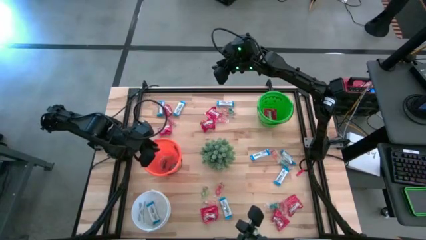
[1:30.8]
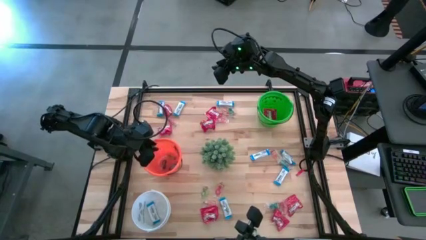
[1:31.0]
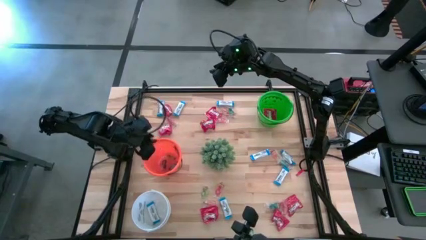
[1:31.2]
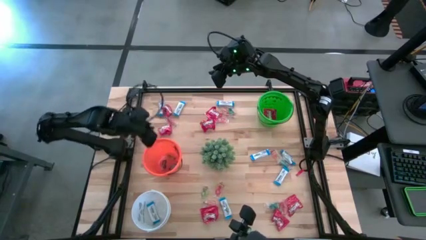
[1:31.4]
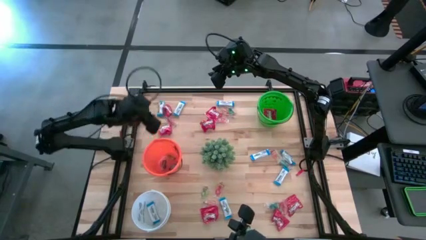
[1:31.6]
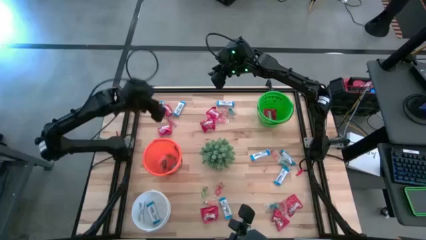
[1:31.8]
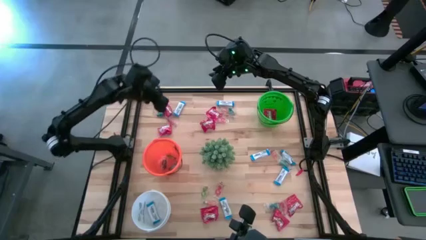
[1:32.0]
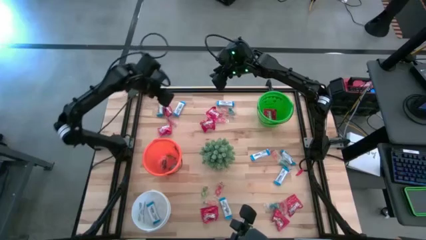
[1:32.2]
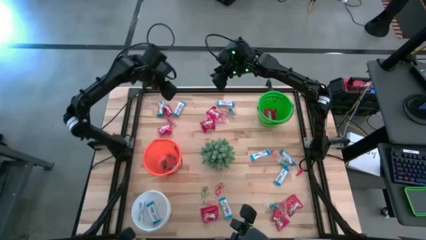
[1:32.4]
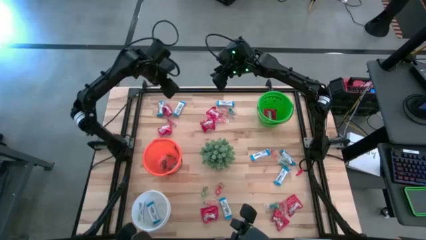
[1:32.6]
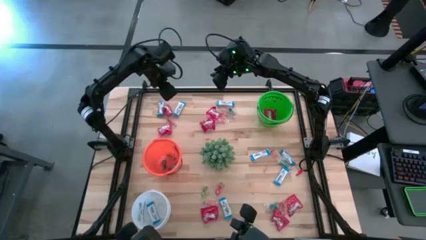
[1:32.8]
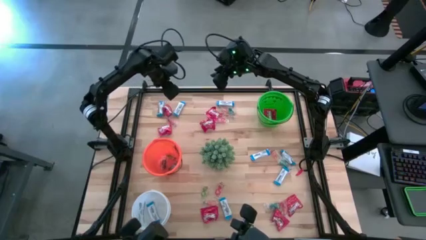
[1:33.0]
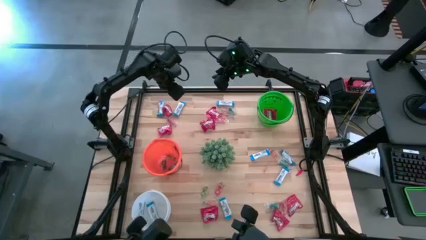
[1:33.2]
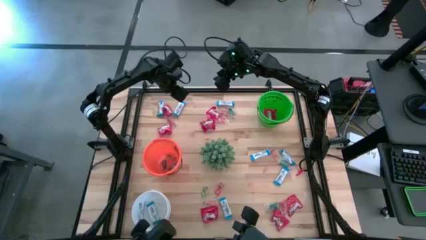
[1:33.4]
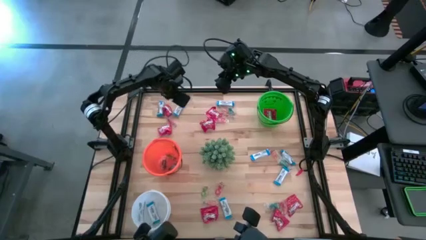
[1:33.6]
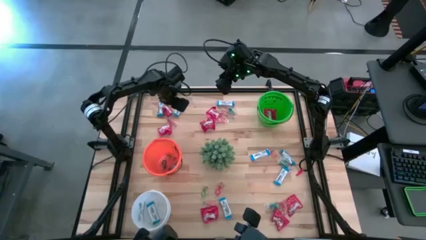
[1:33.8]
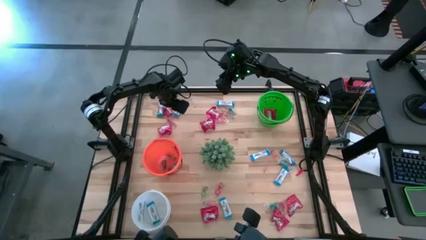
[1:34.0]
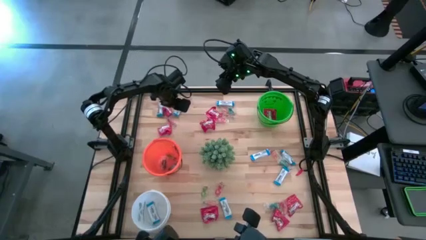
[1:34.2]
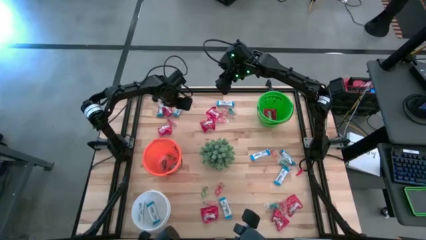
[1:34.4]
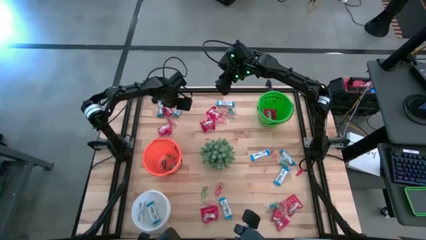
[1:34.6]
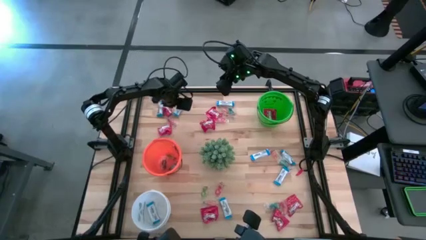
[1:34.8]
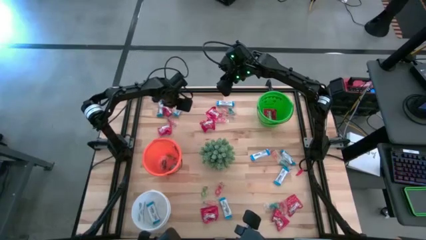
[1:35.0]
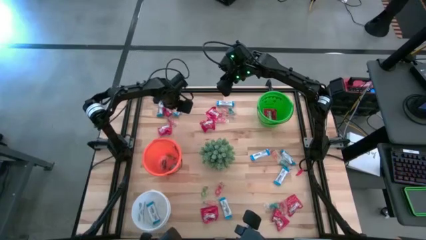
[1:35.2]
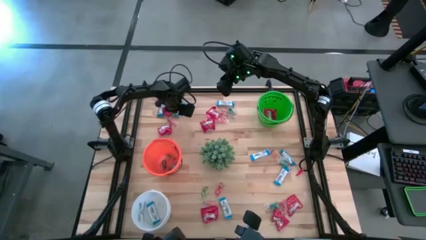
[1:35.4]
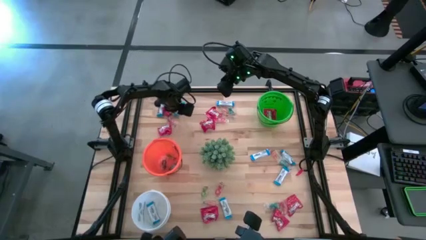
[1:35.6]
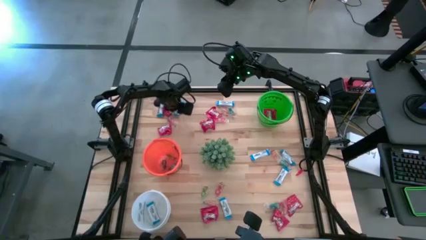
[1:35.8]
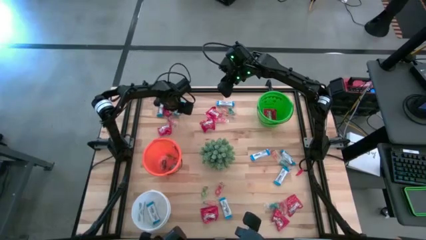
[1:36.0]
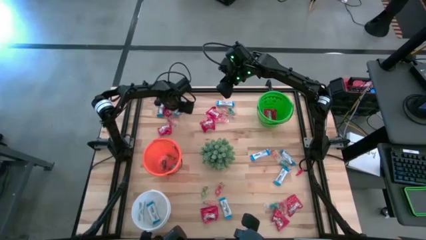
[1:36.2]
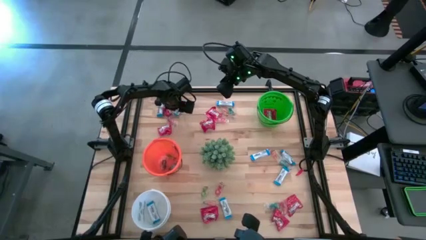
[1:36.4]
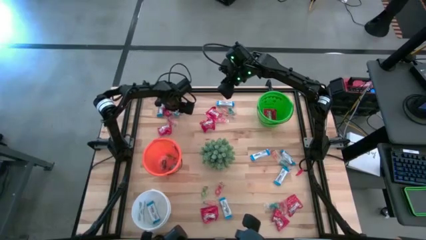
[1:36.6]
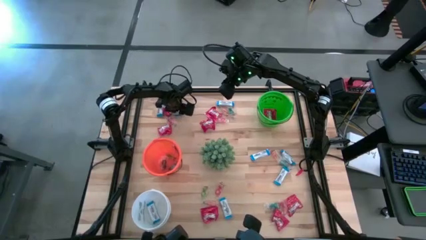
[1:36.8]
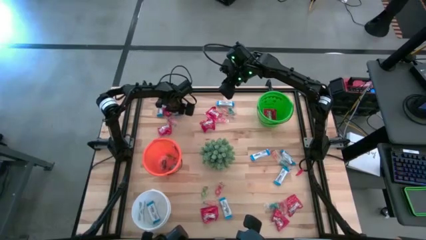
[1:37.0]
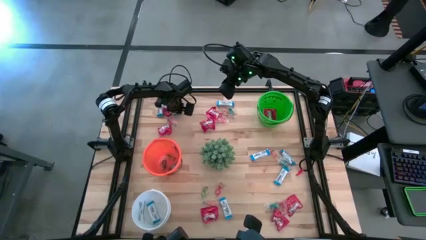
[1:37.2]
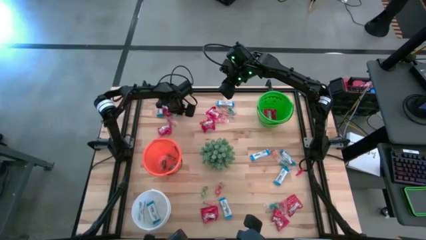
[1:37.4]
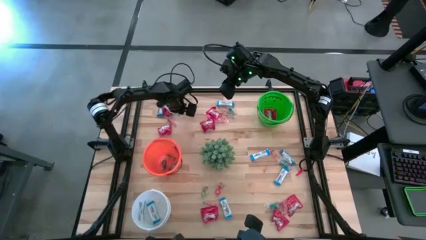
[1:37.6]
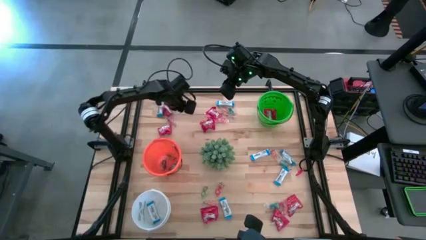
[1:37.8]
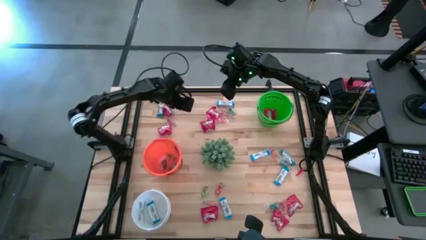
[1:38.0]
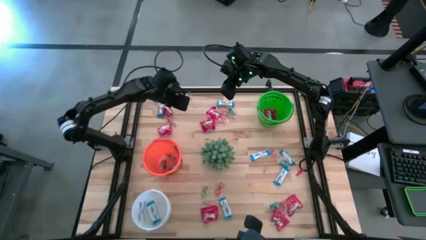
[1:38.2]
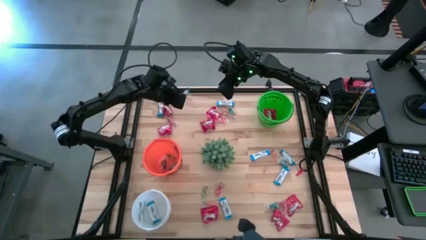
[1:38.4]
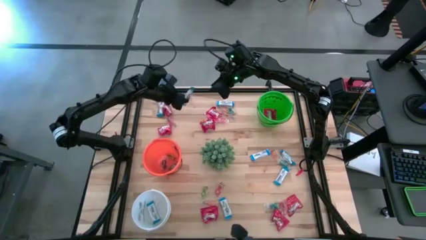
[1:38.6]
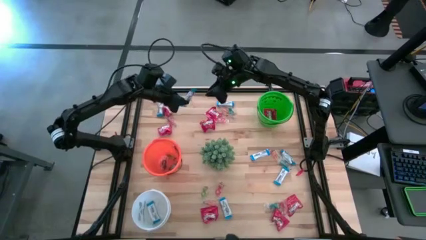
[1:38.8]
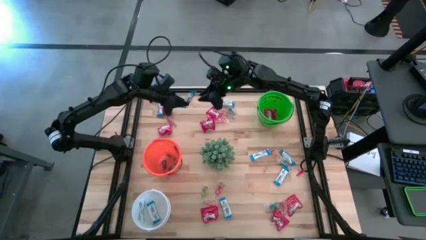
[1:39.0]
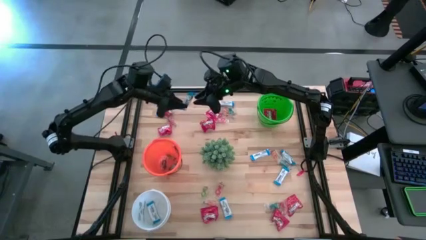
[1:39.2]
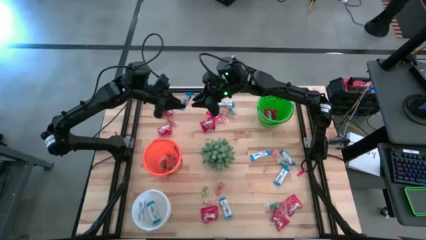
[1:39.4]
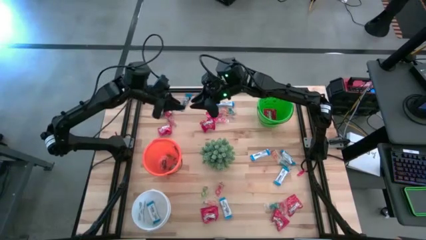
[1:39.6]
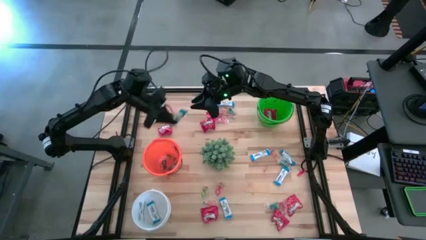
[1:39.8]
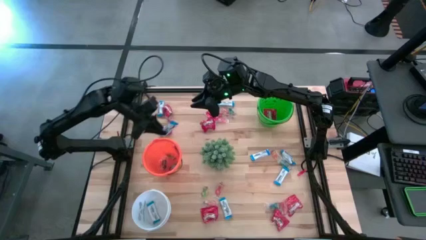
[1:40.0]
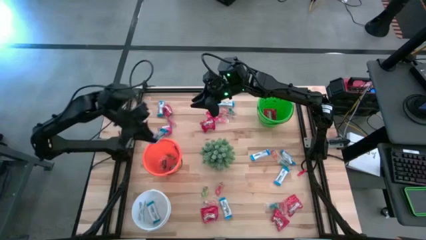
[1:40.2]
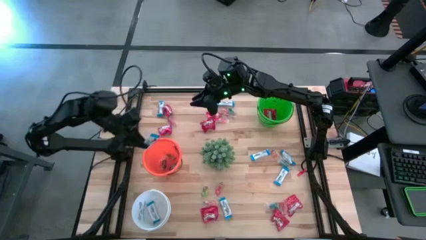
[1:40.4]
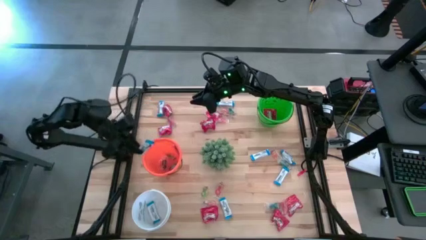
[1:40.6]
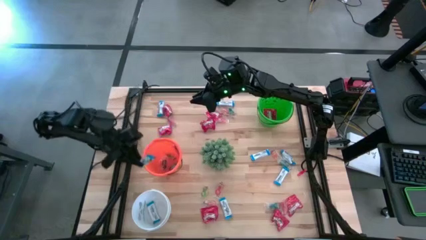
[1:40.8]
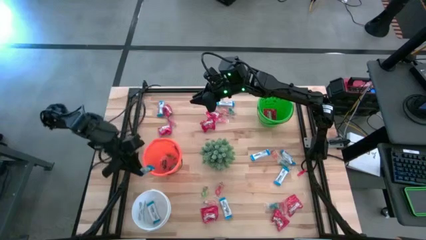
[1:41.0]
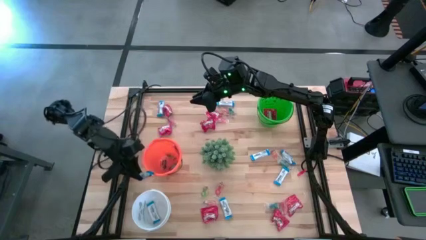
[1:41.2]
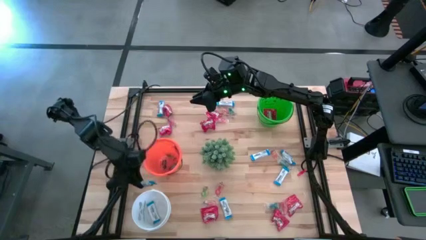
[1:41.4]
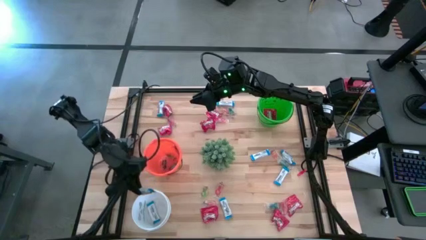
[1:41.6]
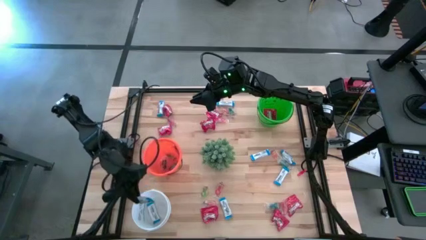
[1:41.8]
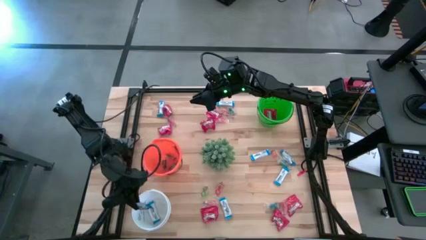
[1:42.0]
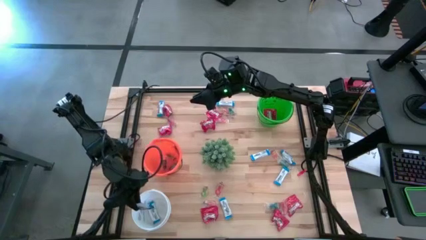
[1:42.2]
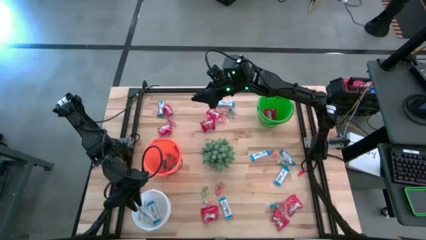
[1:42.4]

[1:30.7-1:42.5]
Task: Sort candy
Put the white chocolate into the white bucket

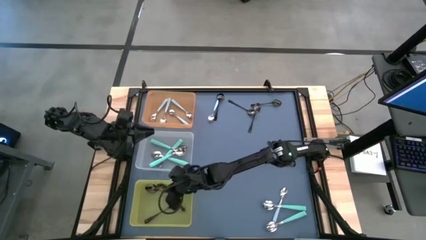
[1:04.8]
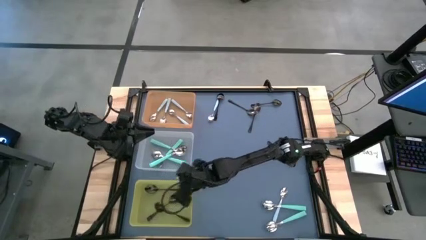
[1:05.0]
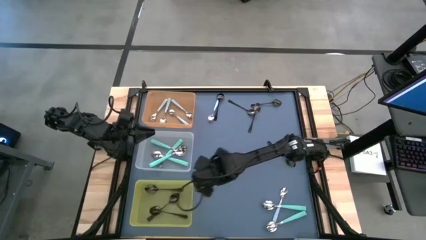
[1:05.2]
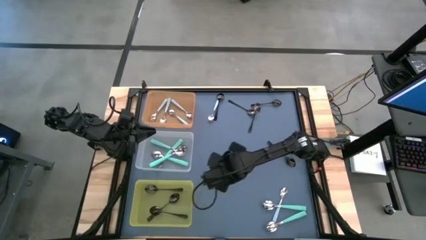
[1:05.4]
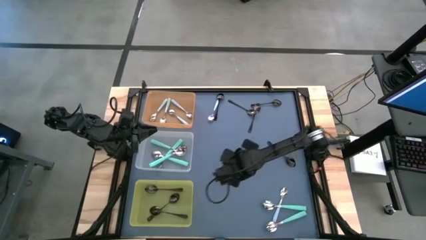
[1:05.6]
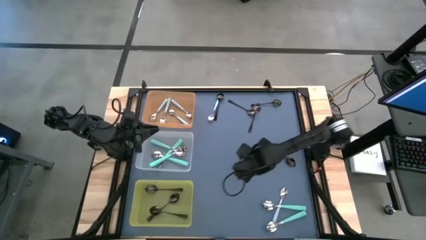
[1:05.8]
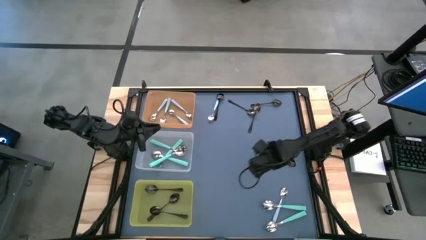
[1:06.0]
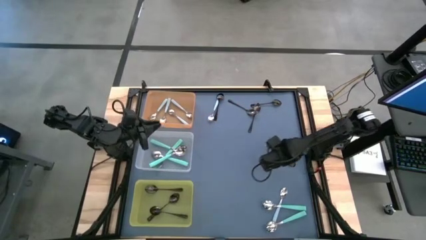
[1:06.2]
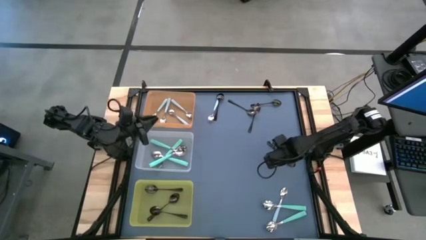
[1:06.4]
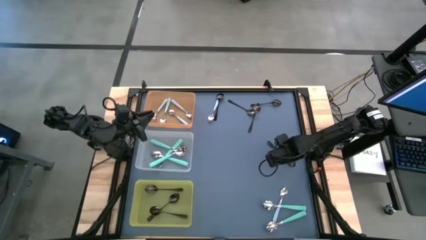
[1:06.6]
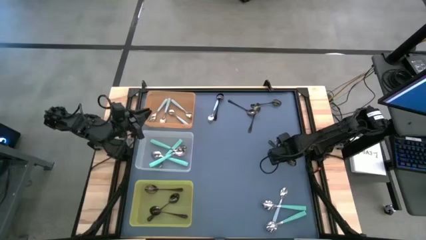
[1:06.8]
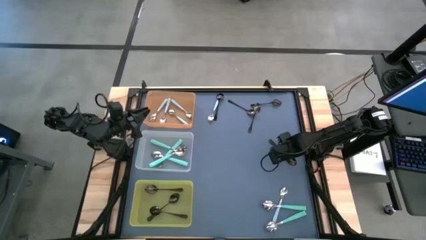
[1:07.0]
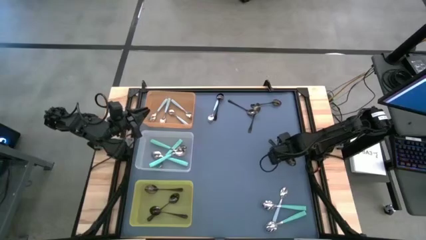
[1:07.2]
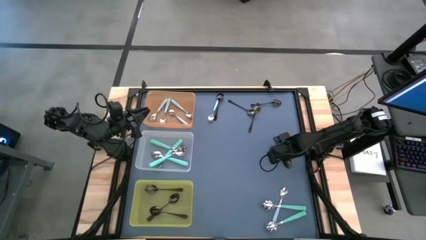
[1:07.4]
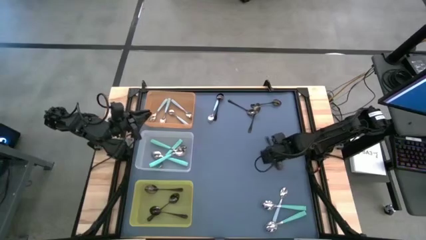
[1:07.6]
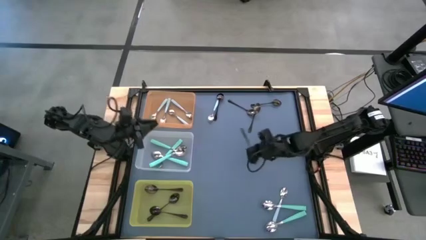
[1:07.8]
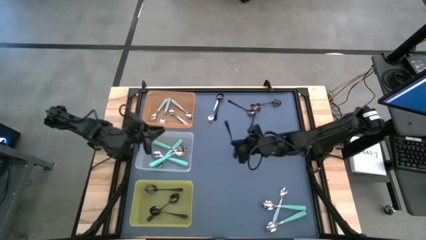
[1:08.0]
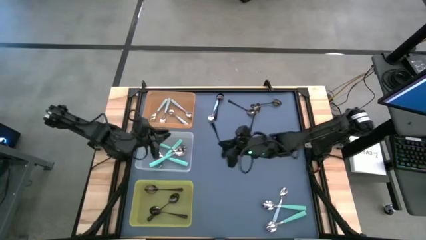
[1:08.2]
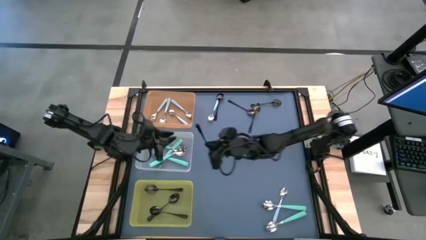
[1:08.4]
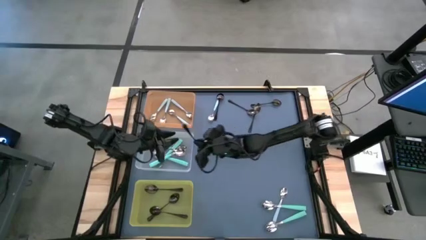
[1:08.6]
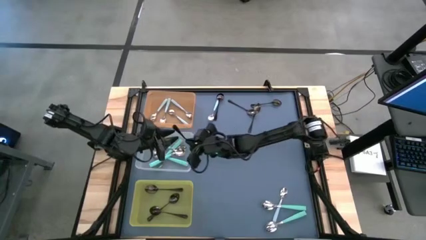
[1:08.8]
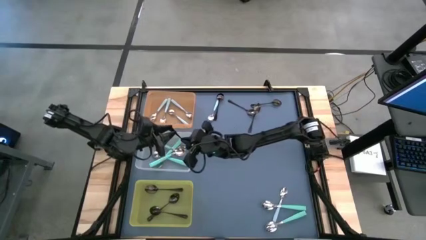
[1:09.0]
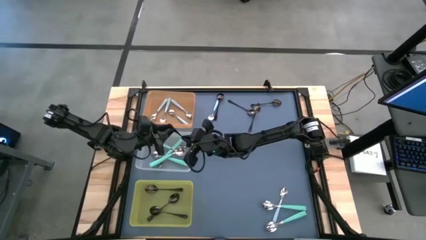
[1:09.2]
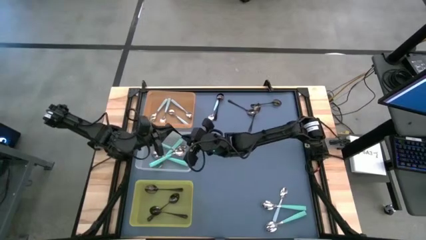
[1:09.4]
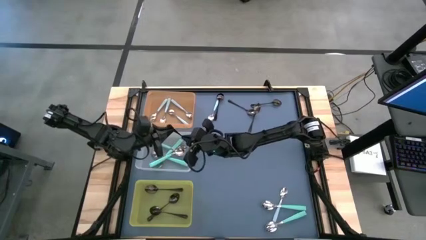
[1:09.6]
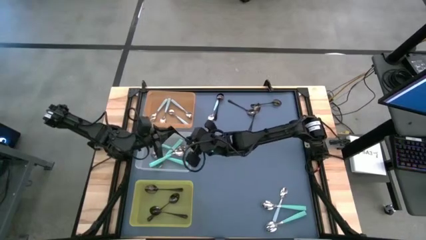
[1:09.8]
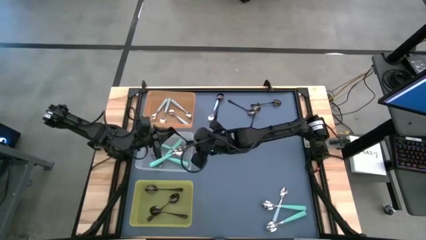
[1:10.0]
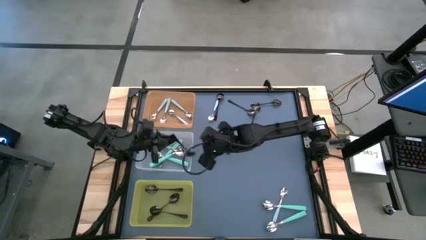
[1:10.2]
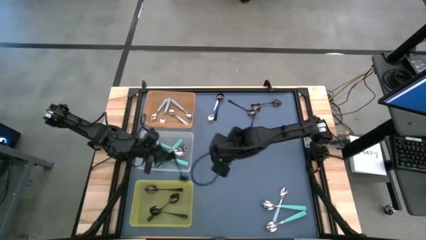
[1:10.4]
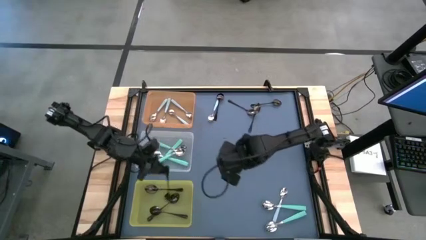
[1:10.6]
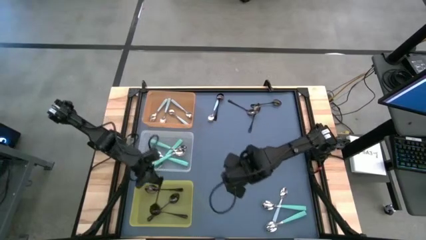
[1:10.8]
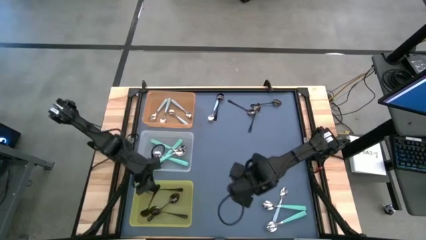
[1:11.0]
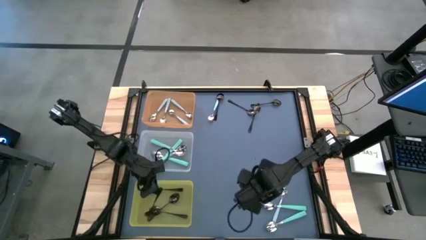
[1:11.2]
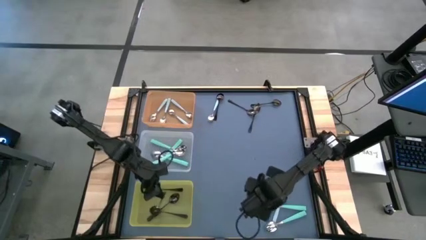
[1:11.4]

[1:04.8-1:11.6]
Task: Sort silverware by color (type)
Put the black spoon into the yellow bin
